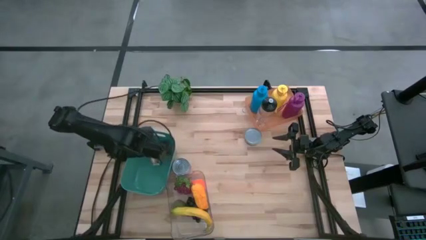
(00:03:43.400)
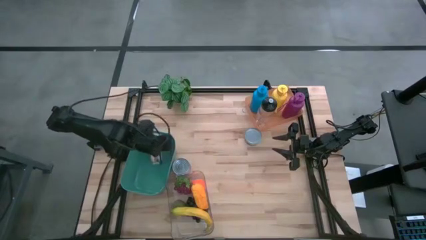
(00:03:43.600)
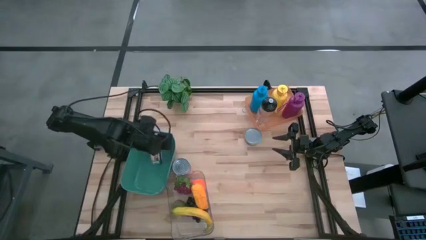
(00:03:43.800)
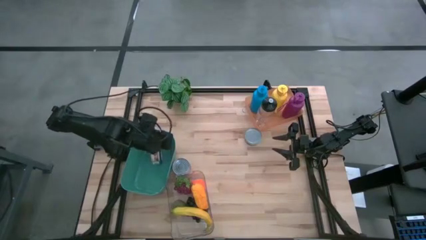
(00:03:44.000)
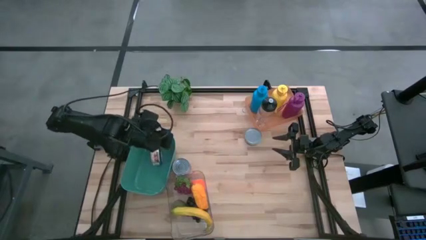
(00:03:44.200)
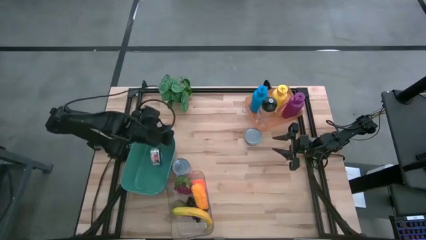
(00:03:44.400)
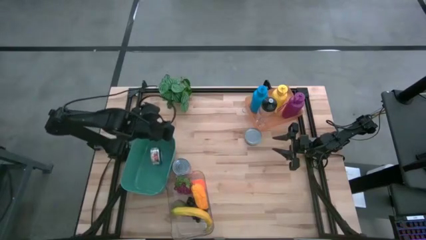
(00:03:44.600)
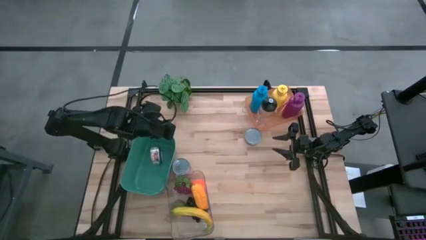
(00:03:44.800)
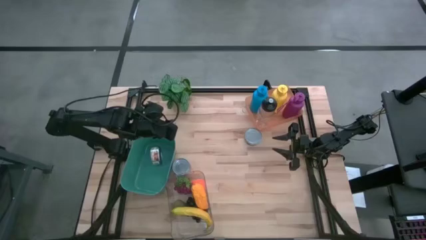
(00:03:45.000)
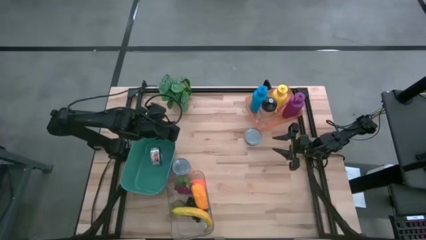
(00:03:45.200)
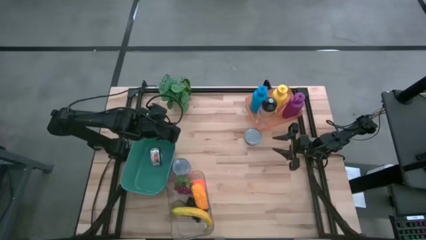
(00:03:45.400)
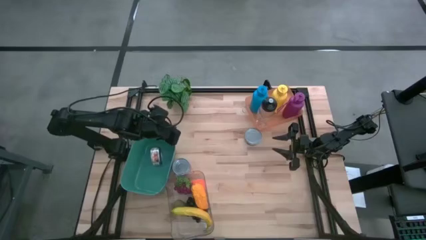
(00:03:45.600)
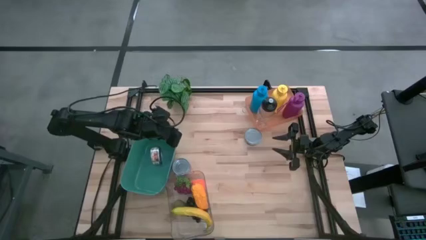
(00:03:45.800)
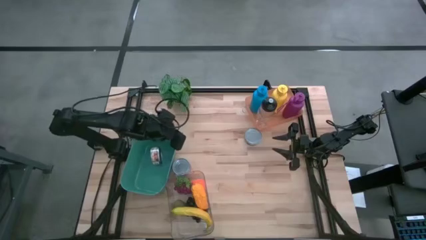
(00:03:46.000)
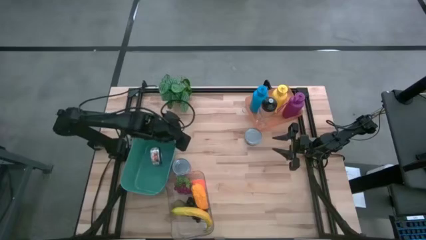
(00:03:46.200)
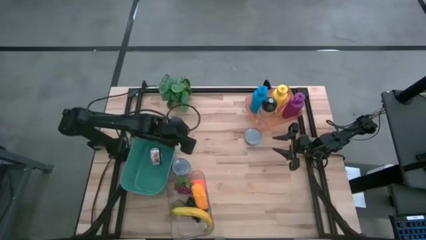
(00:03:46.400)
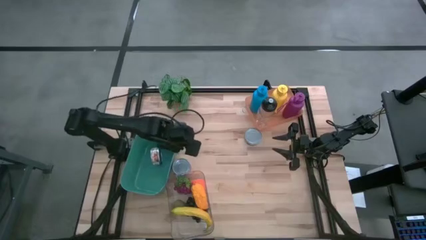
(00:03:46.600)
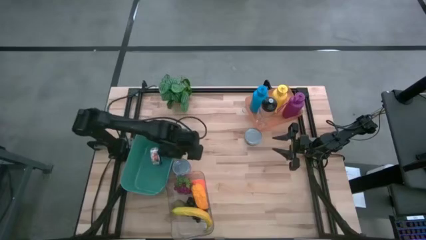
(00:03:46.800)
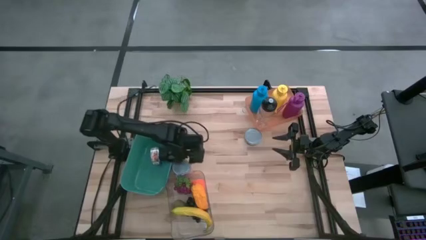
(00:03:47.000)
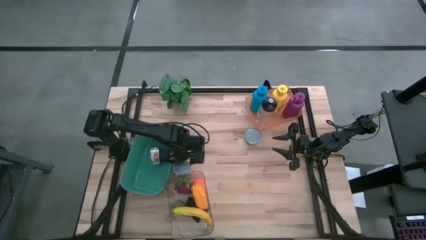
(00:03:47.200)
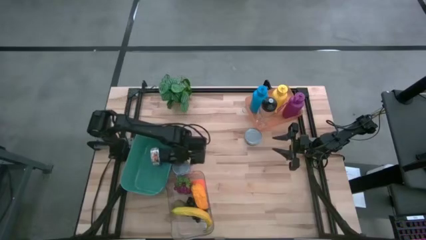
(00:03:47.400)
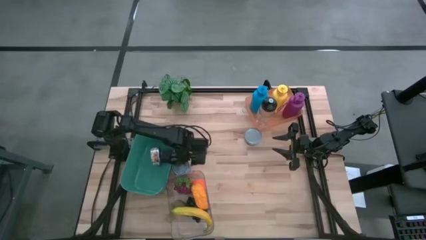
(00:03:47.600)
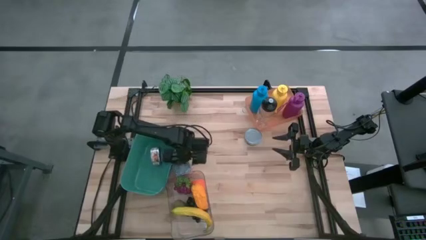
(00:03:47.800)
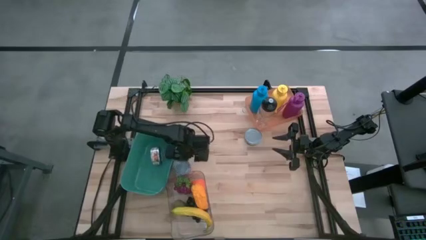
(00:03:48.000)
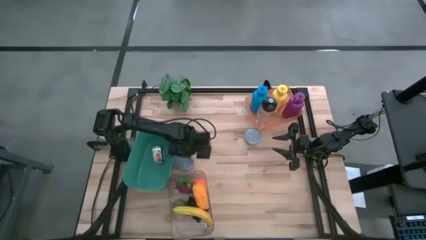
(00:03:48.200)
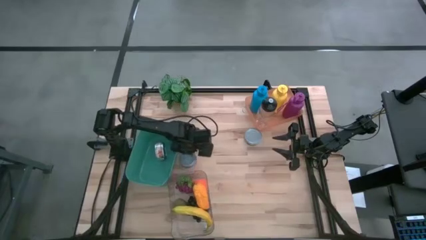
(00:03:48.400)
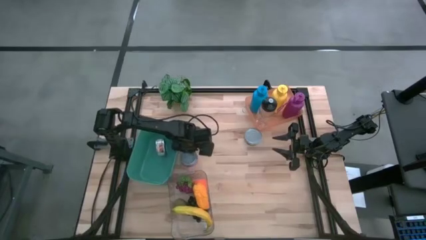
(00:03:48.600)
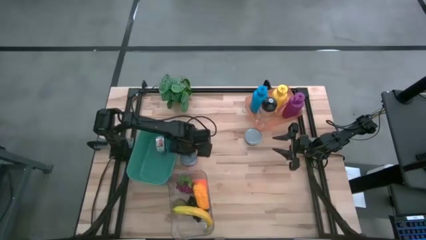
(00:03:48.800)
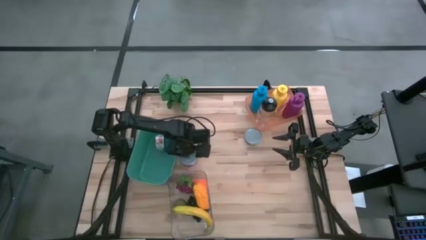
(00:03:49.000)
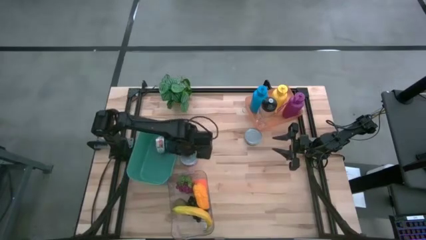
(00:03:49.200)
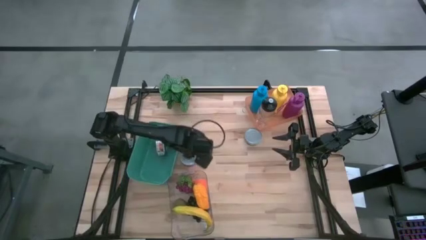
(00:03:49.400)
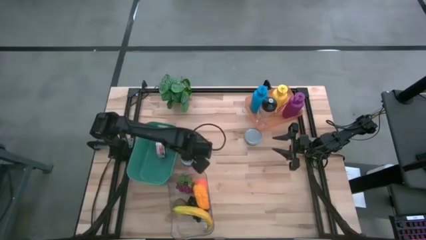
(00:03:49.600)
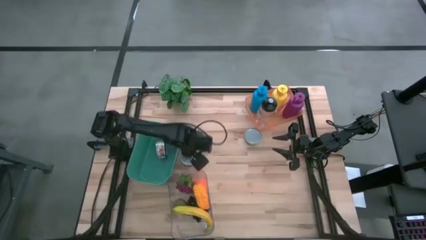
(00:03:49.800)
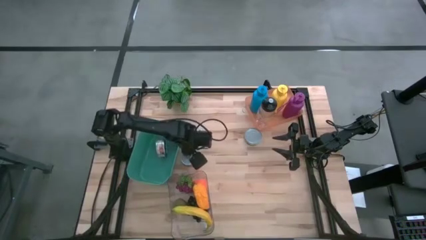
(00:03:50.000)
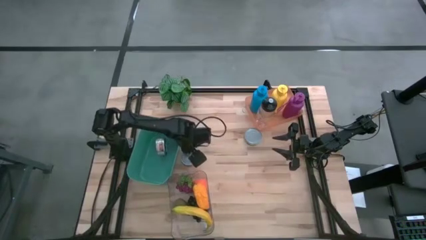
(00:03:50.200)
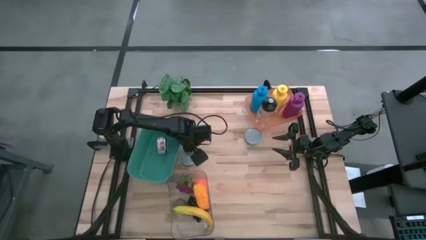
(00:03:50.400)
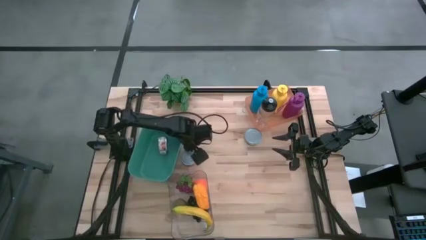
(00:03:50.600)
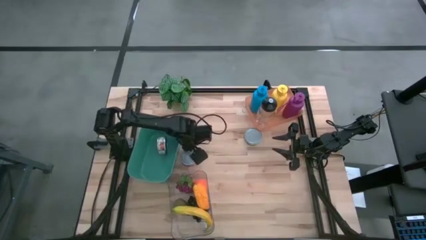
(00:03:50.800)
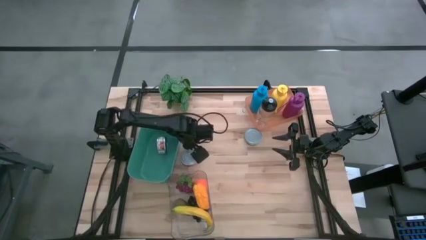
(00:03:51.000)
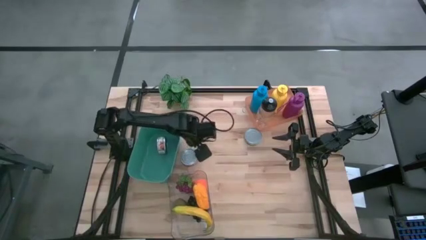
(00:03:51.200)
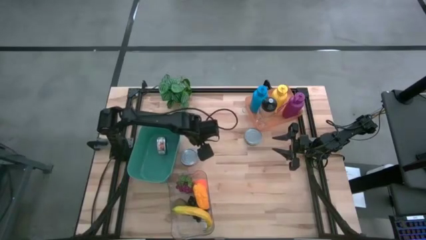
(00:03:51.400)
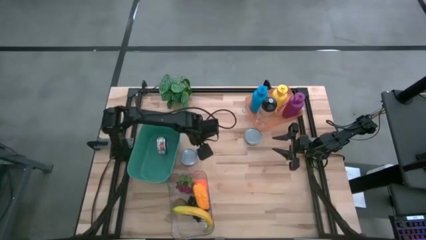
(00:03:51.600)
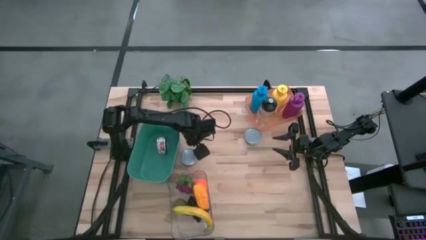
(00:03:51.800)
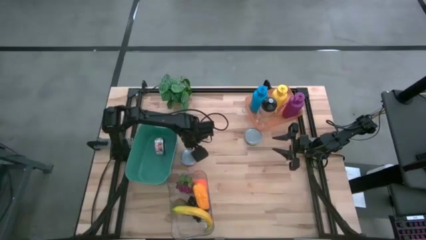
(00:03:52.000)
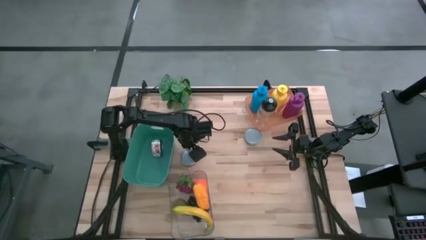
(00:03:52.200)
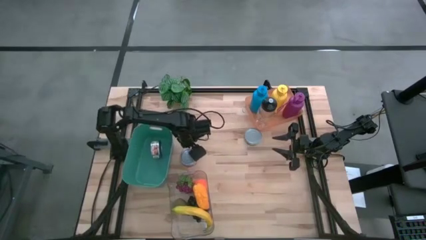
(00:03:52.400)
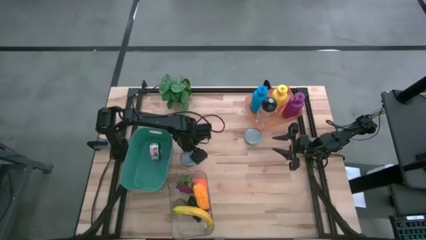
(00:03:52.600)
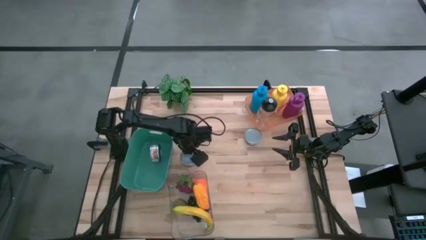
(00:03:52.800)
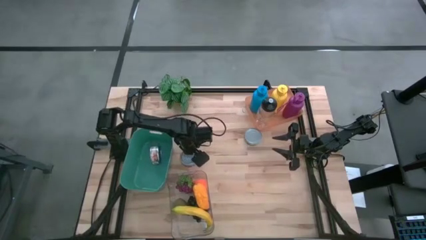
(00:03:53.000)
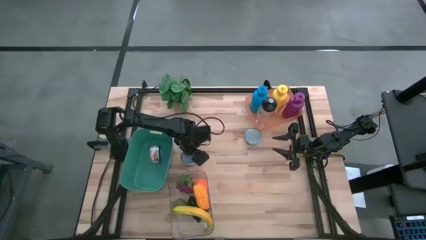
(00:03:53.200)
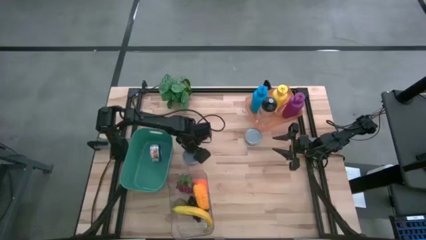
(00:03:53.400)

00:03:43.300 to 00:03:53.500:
Task: Pick & Place Food Item
Put the red tuna can into the blue bin

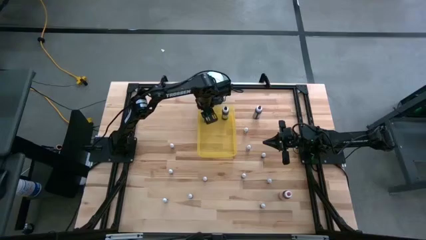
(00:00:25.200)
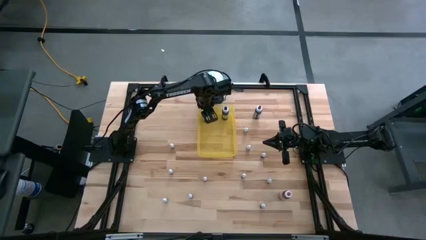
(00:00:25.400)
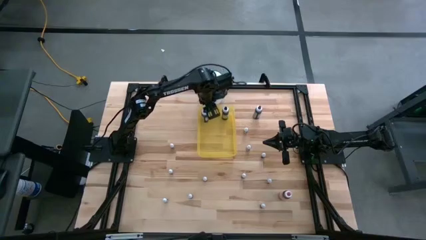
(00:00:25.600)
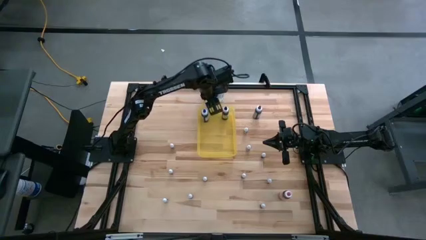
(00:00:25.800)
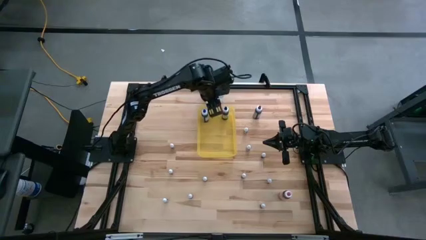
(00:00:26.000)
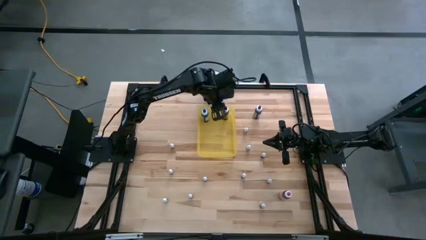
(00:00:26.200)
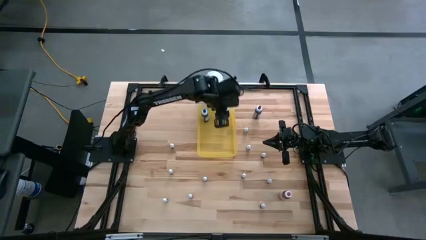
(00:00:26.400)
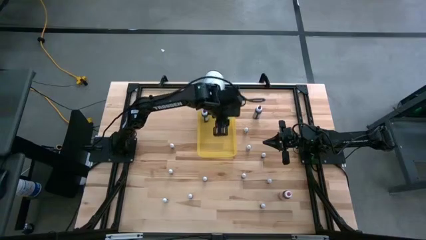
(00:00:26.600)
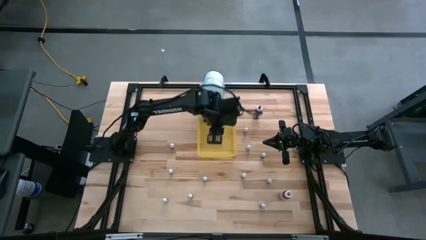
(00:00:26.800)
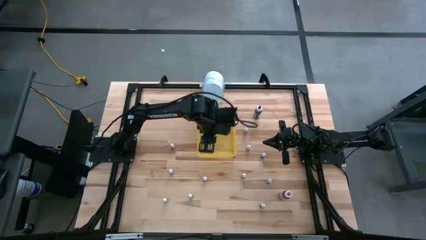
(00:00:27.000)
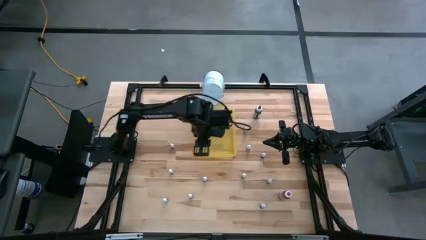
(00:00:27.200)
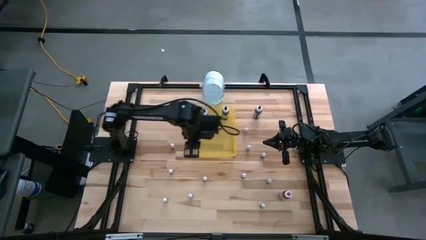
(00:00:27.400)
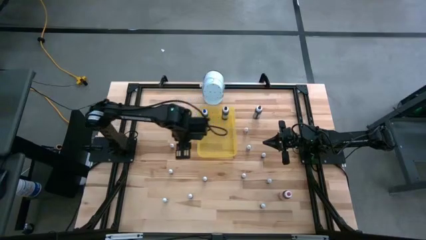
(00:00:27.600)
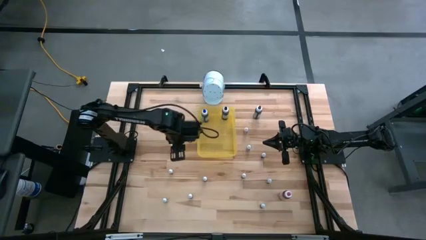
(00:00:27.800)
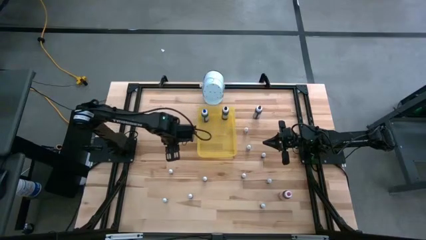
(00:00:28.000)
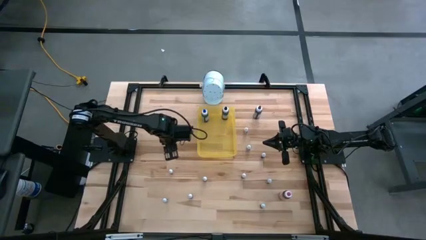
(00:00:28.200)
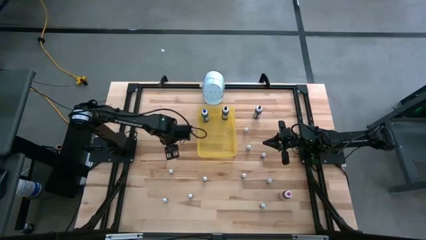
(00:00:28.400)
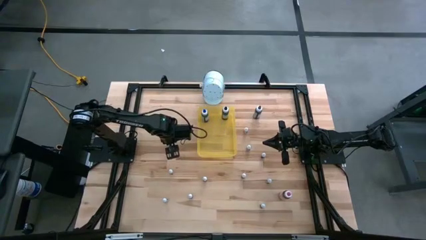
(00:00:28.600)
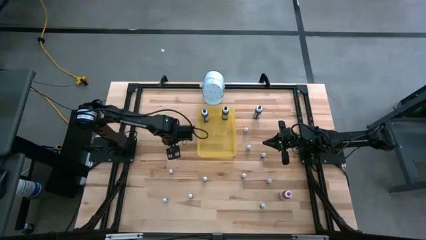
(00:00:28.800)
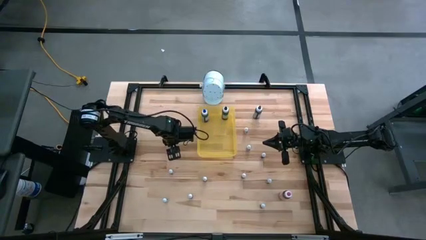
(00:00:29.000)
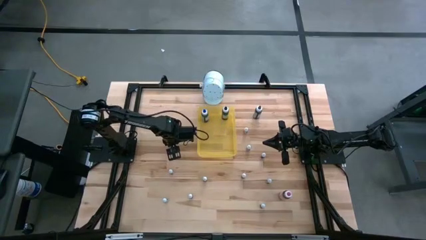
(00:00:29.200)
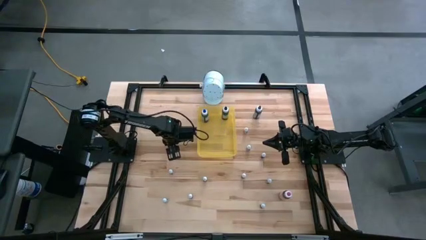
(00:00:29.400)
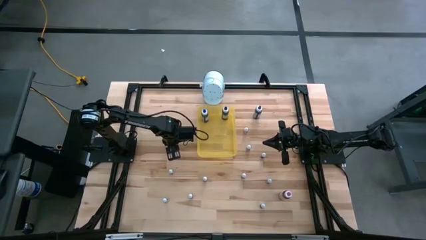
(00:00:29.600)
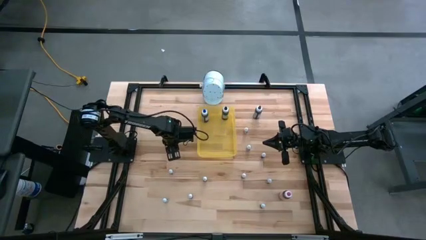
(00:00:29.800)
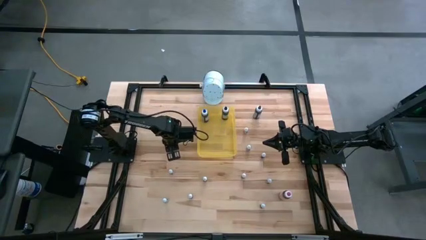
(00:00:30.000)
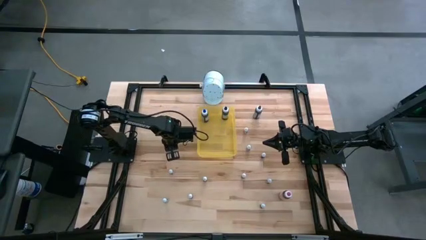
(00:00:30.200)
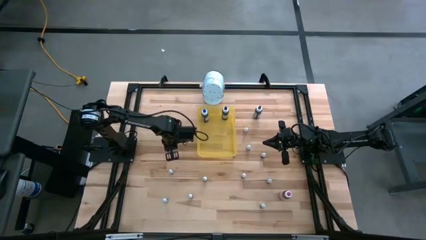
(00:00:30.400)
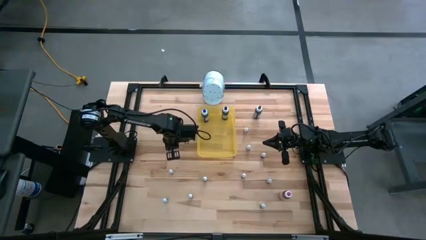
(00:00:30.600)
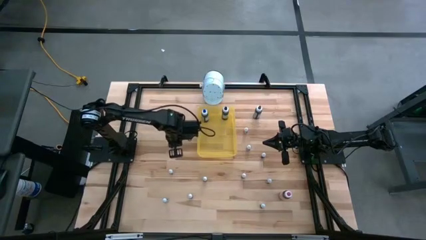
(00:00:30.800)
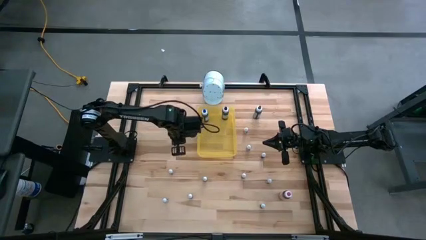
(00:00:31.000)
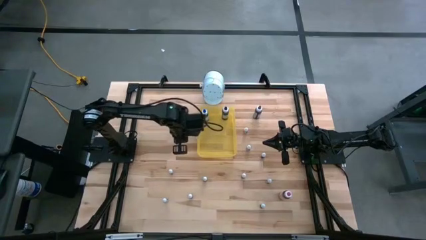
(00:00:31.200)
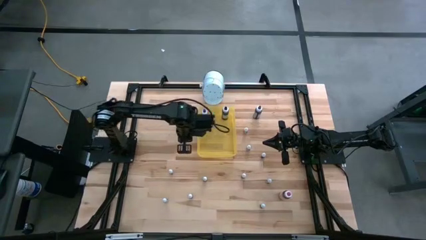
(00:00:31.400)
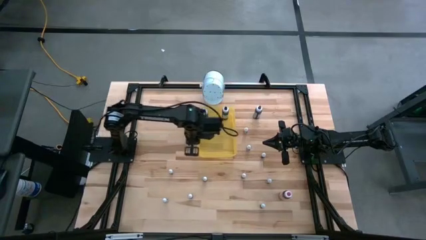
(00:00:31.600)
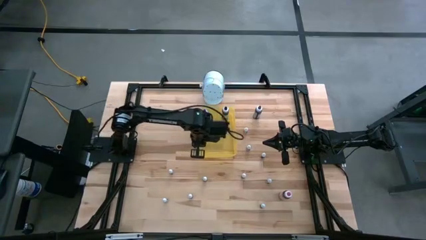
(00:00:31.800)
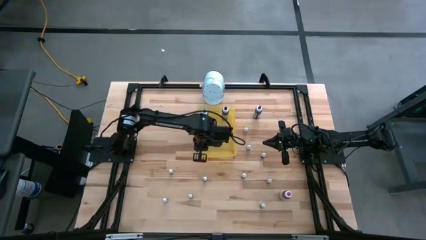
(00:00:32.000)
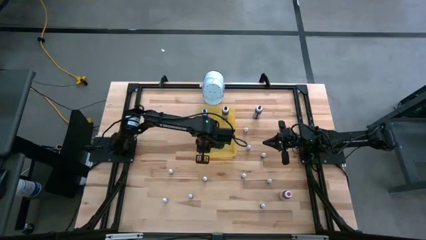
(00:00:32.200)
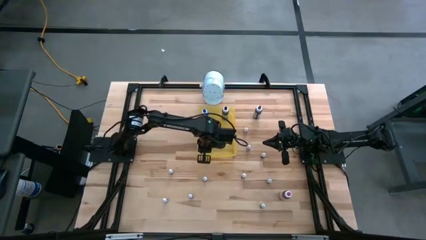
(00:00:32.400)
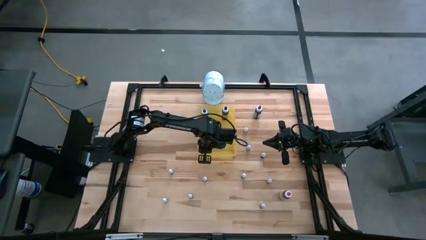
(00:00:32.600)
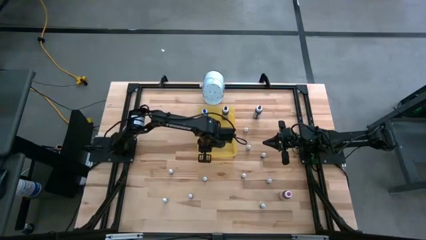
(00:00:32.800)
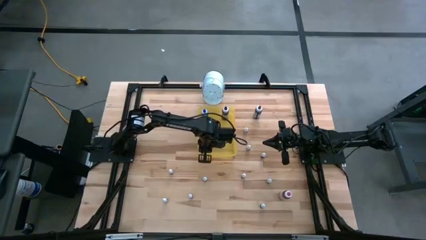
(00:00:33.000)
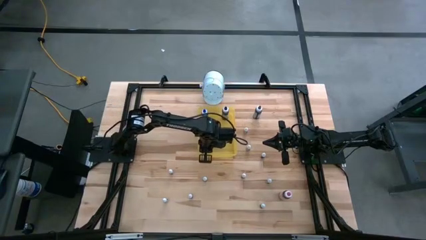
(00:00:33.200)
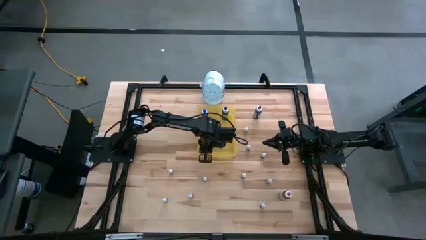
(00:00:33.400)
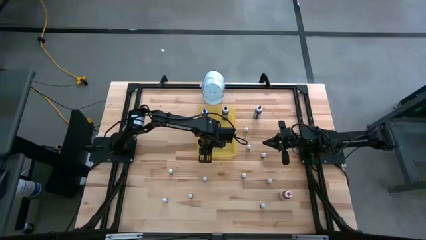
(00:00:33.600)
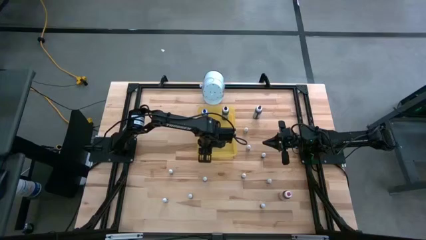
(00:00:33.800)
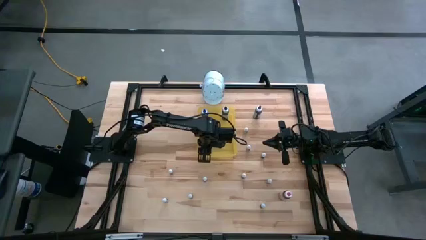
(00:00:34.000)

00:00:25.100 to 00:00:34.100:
Task: Pick & Place food coloring
Put the small green food coloring bottle in the yellow transparent bin
